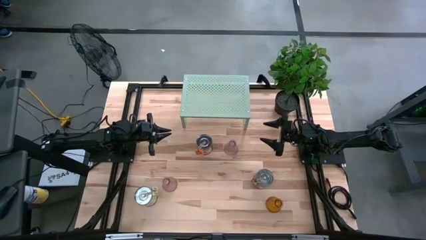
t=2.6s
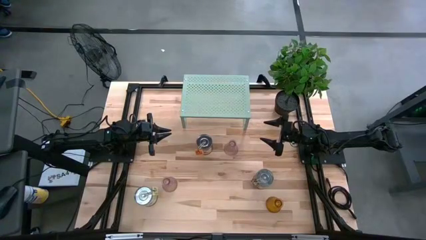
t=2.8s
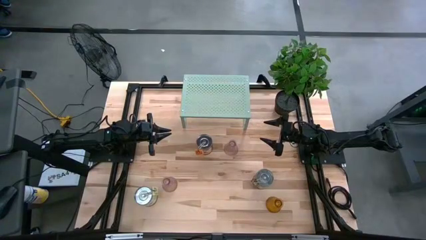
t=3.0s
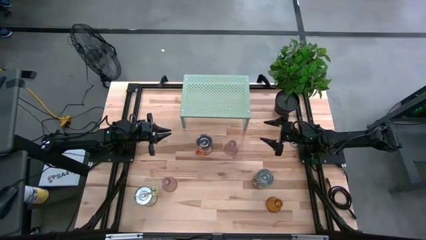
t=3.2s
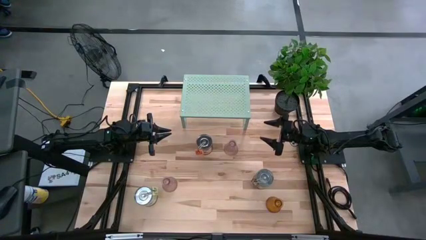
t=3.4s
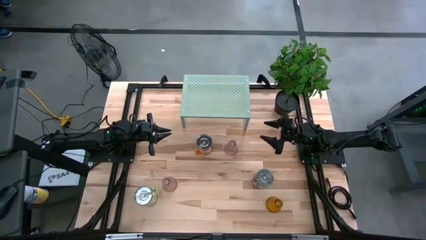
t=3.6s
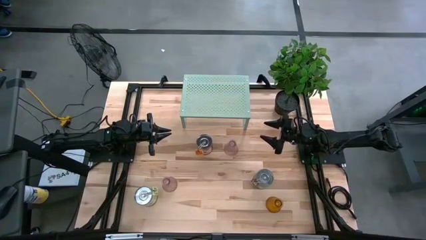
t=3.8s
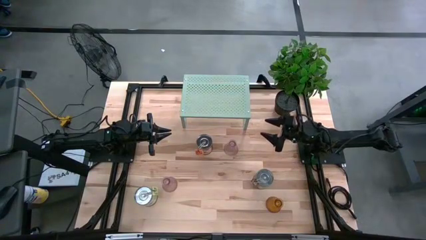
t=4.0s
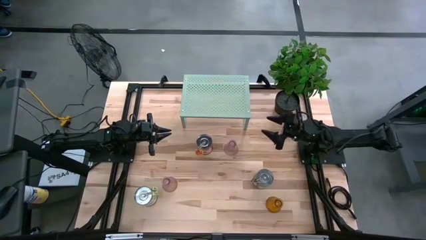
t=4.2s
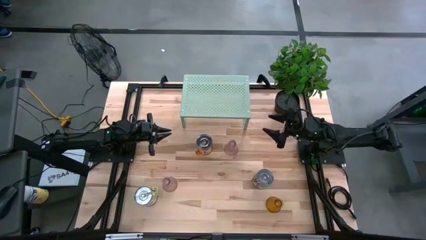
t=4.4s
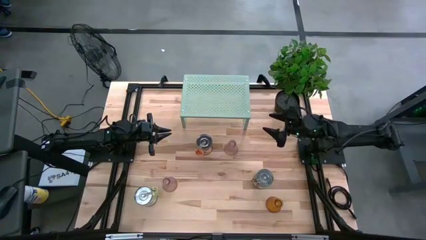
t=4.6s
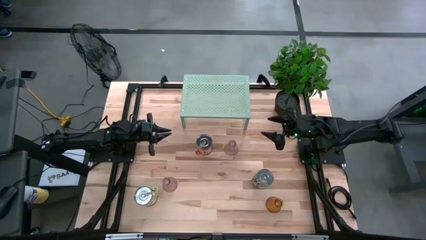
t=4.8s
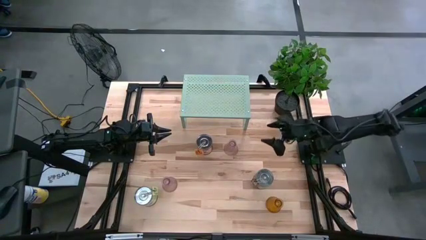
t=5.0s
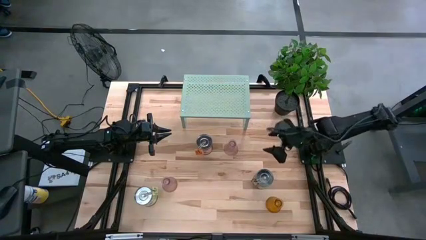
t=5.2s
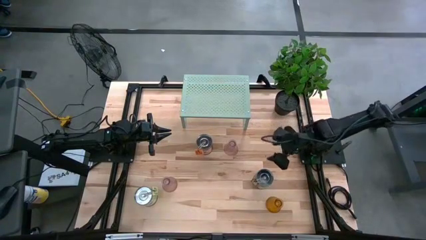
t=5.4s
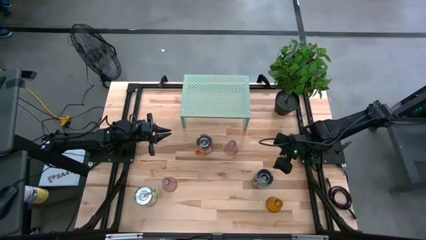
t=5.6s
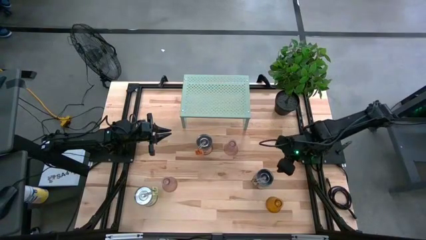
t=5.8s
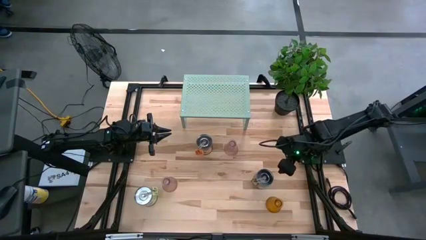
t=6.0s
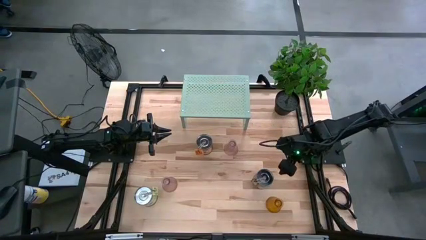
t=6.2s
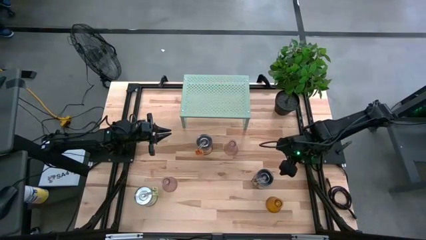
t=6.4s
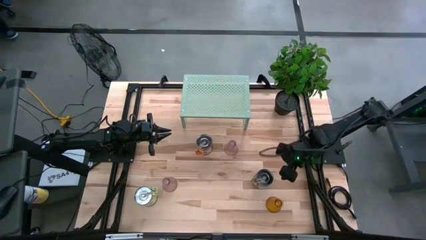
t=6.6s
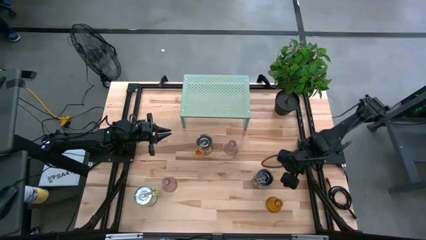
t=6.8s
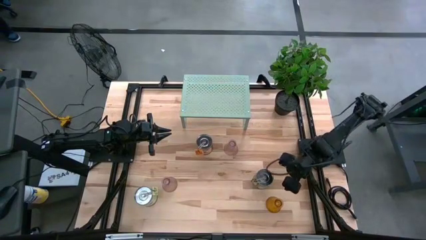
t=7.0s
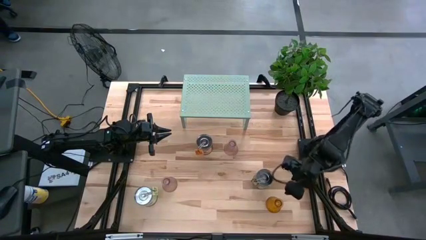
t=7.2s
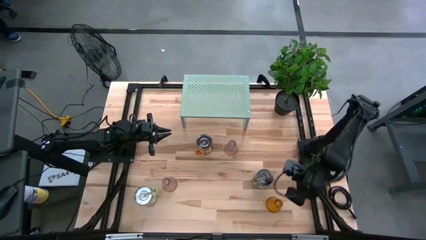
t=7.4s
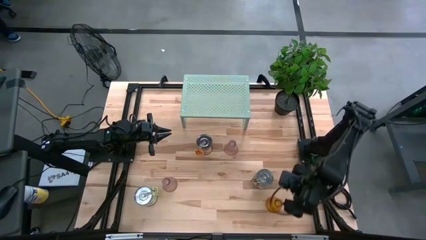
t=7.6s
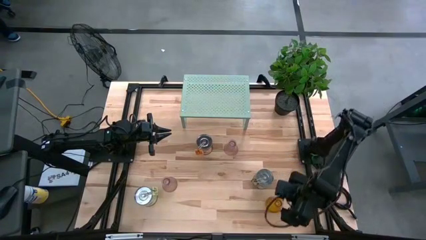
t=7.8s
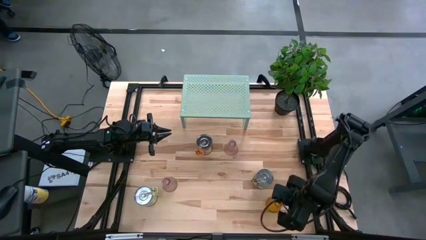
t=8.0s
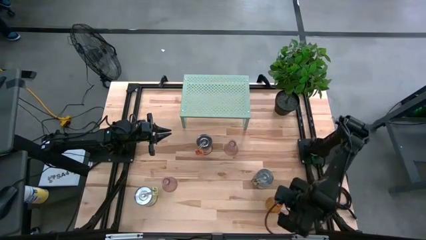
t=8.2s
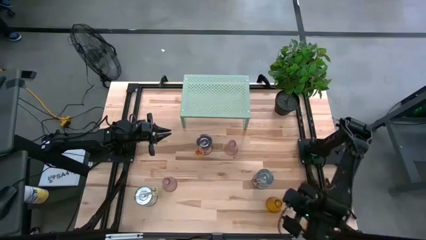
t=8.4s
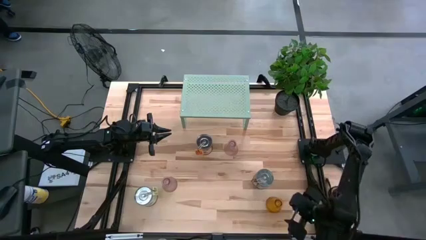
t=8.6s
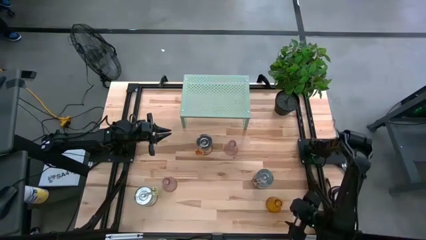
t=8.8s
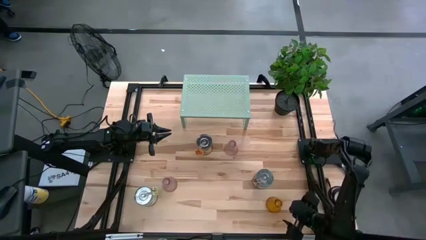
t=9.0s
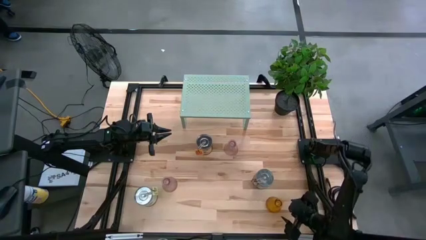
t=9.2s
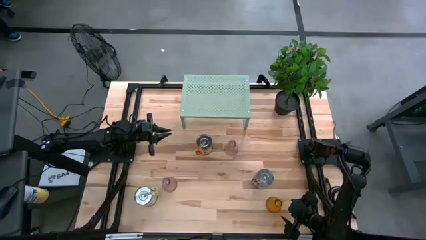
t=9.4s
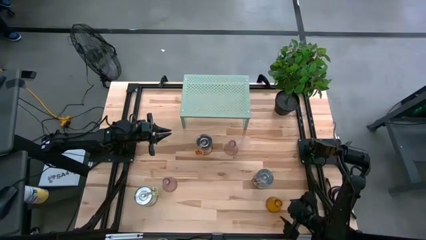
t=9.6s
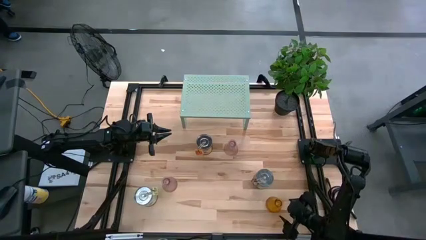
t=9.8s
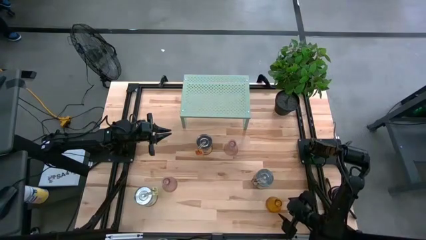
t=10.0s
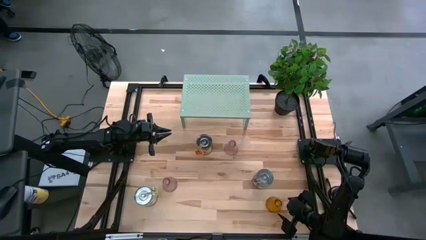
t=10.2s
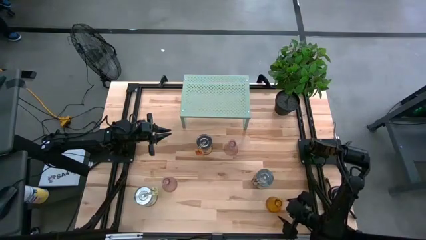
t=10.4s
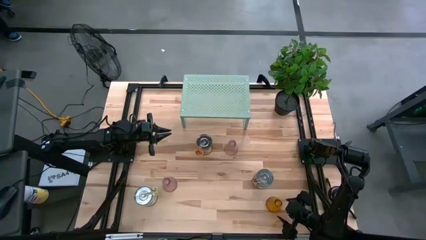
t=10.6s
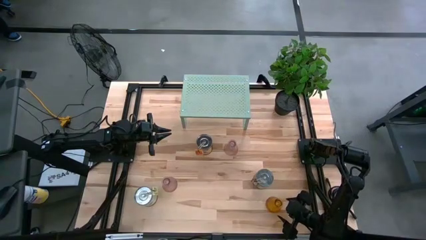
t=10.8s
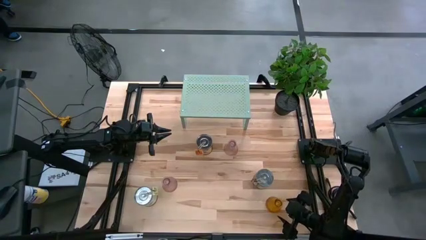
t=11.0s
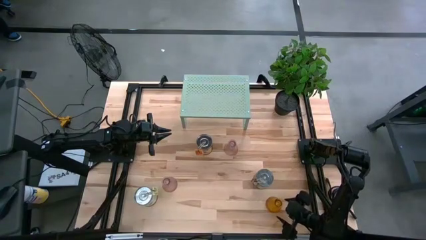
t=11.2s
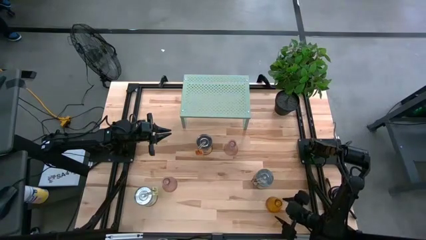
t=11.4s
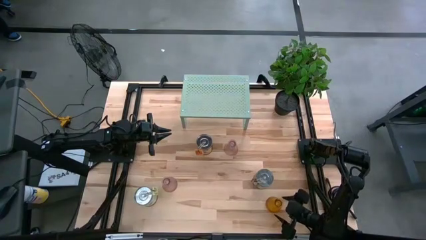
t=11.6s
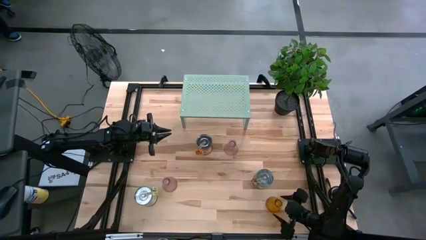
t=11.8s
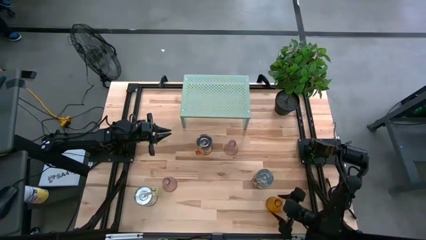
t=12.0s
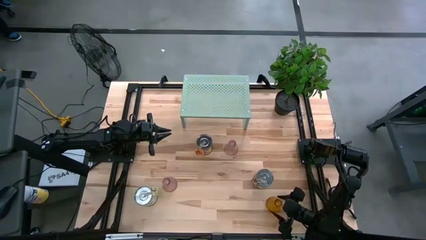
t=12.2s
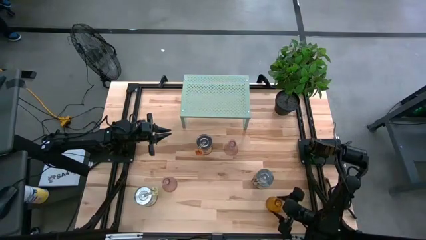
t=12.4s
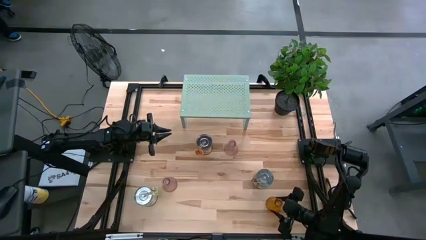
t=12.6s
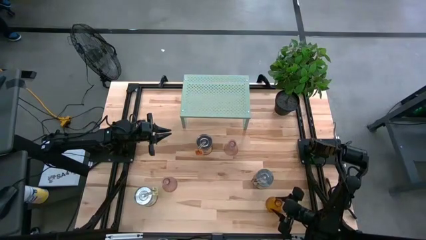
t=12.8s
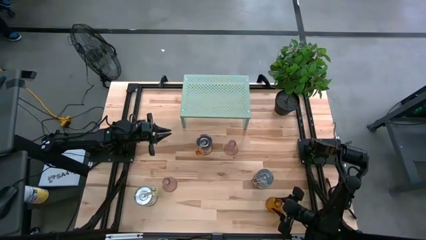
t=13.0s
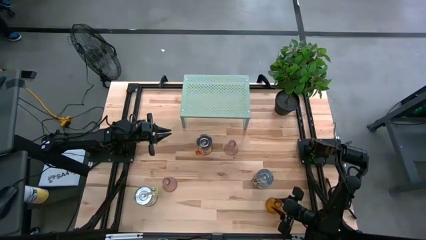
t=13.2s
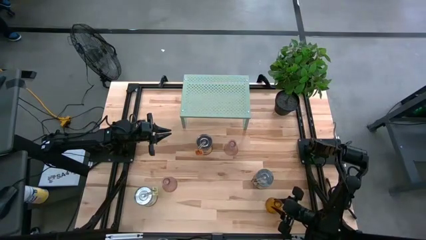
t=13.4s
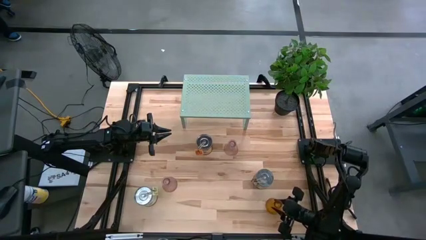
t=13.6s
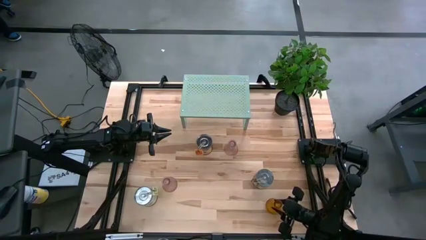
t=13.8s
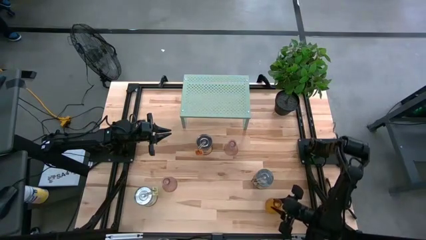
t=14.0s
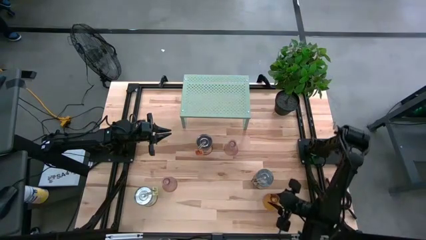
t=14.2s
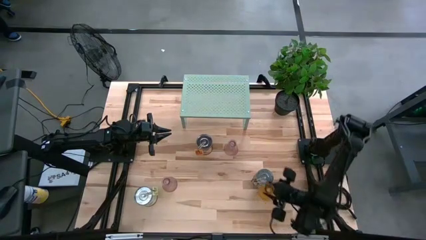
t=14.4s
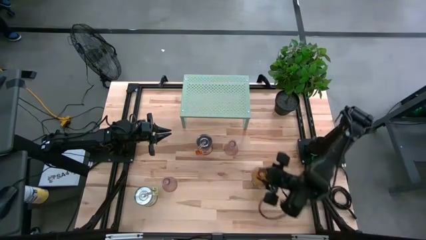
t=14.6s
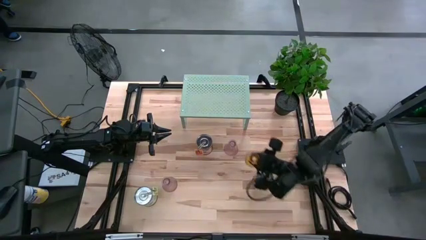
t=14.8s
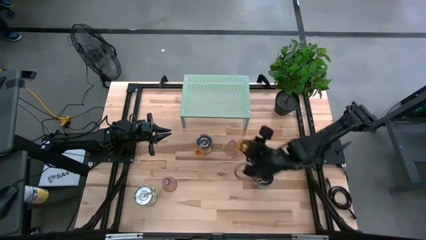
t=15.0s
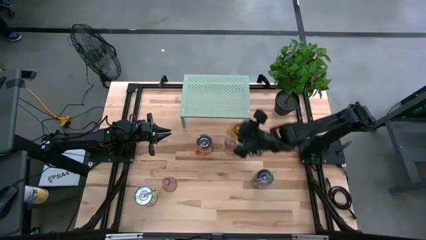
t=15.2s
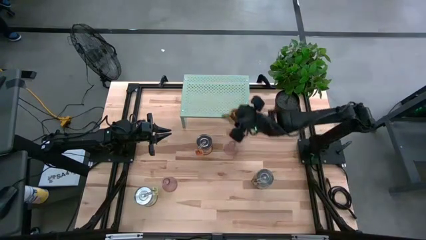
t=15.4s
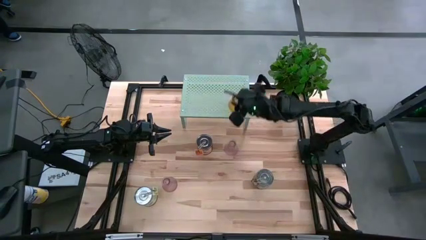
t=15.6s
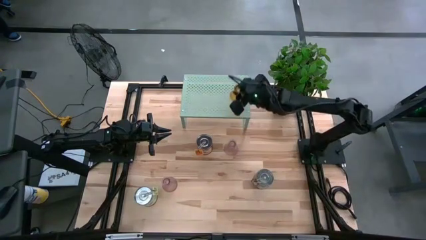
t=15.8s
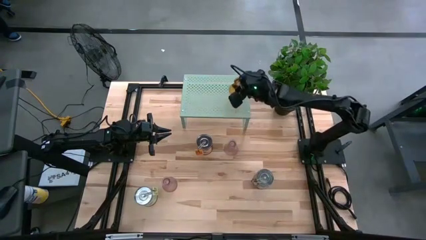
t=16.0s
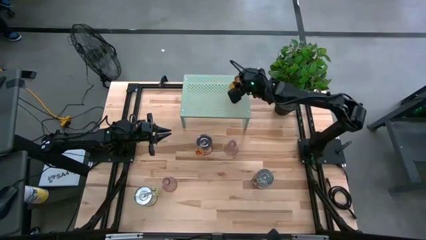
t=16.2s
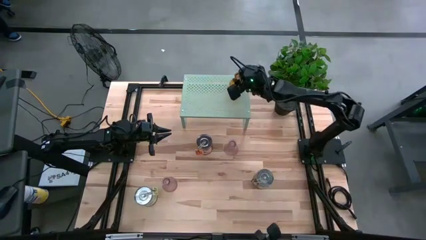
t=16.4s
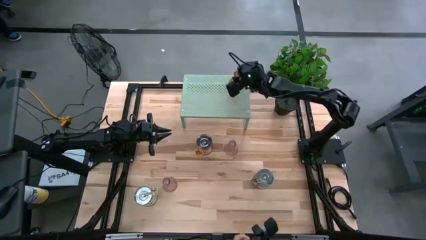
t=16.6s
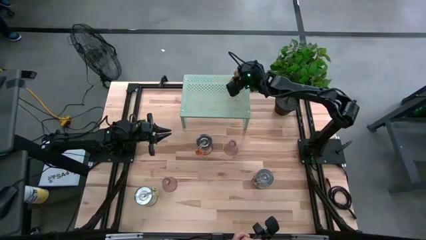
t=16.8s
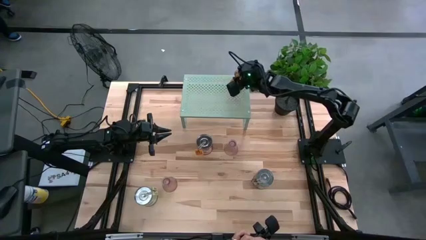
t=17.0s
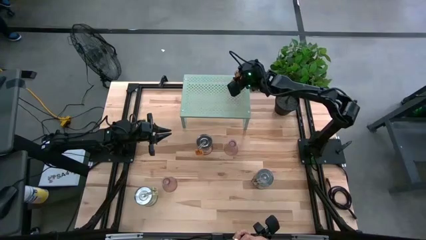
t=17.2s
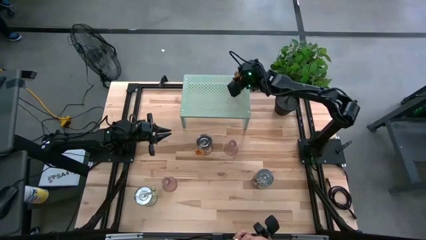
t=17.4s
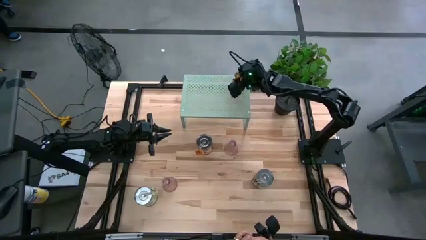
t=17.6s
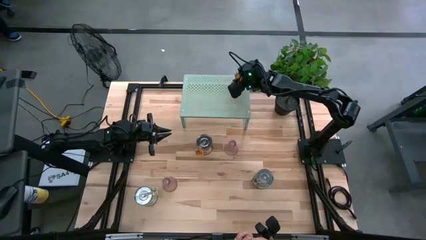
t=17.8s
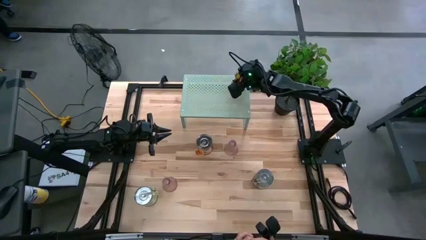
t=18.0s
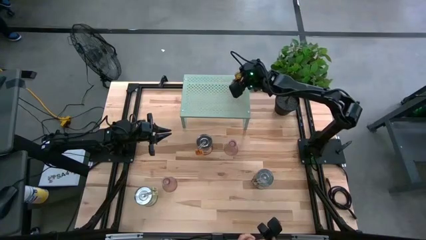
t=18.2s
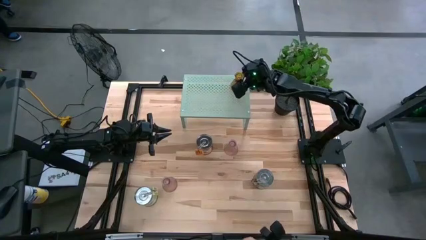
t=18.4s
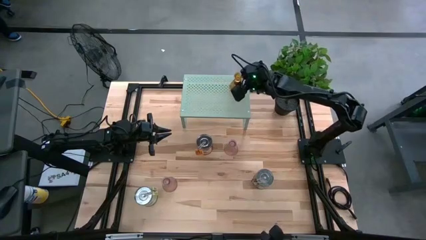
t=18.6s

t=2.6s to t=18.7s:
Task: Pick & Place candle stick holders
Put the yellow glass candle holder on the shelf
